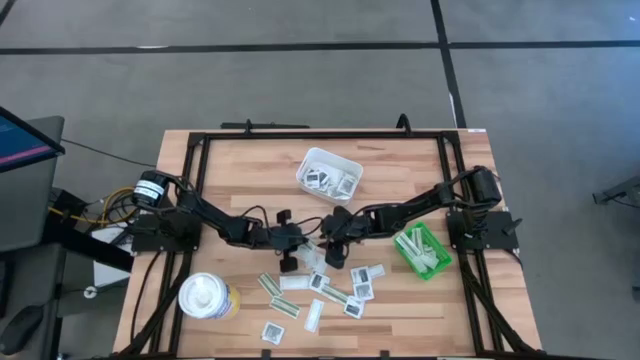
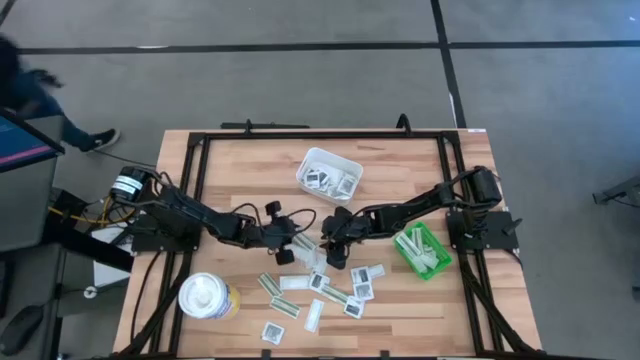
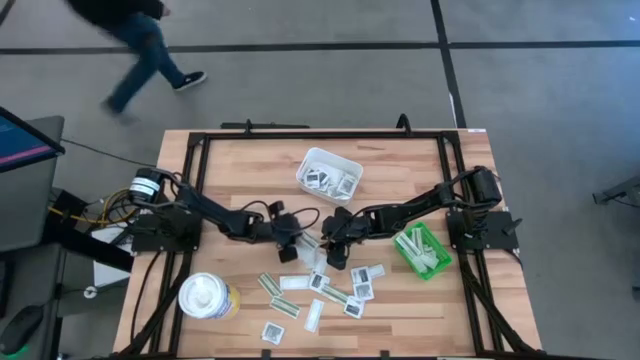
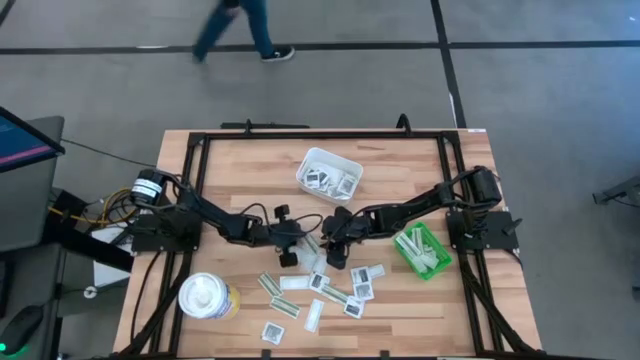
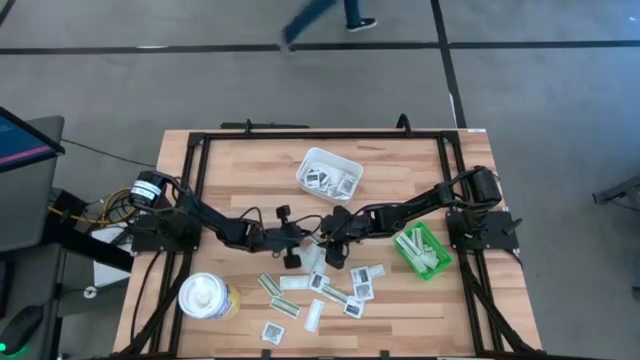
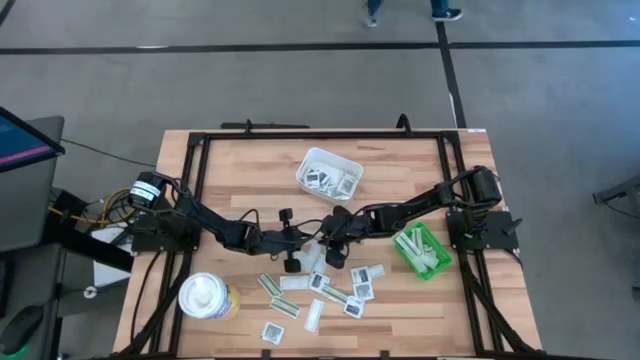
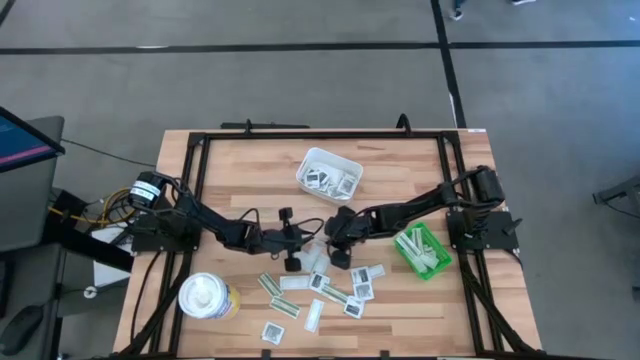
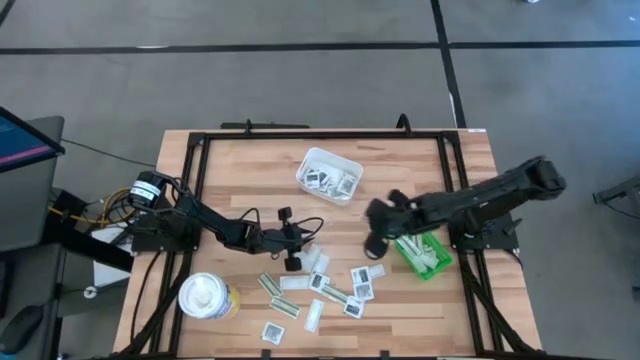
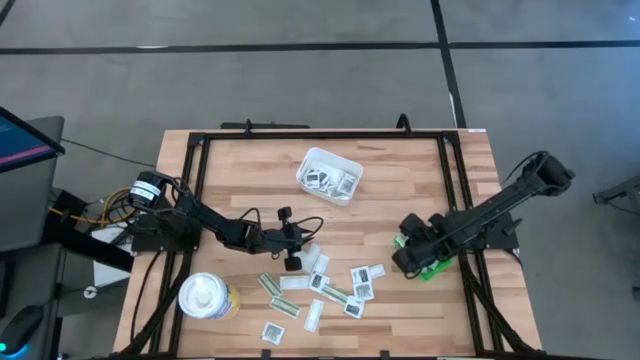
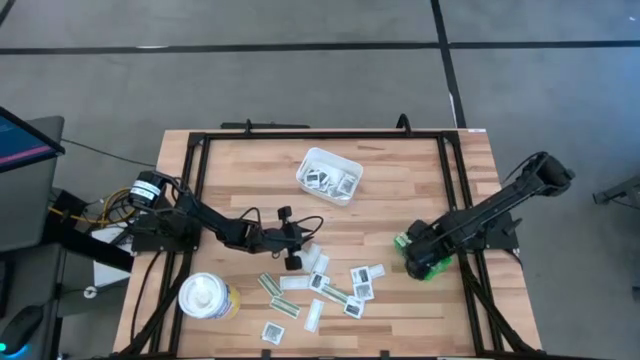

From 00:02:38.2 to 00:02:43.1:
Task: Pick & Place First Aid Supplies
Put the bandage pack into the green bin

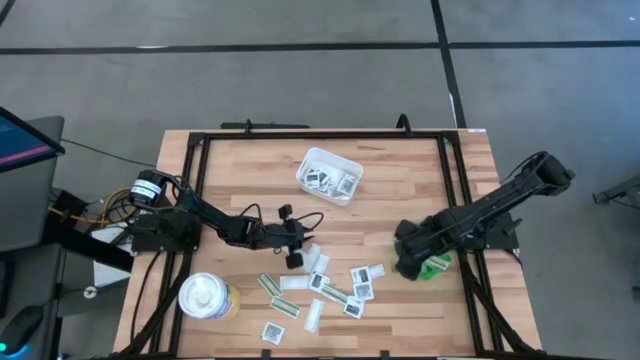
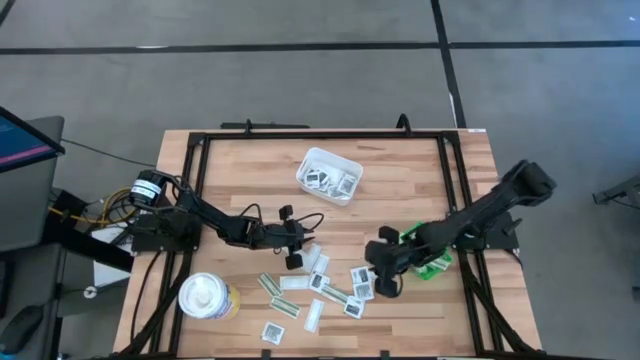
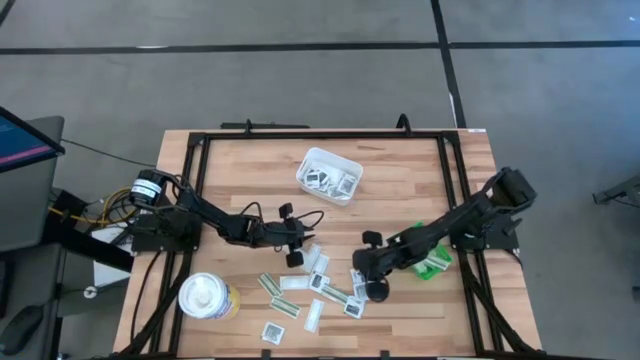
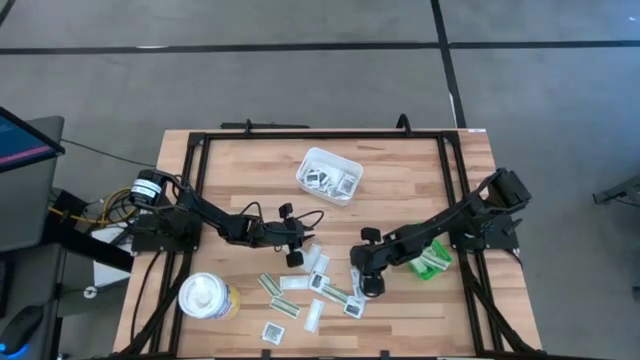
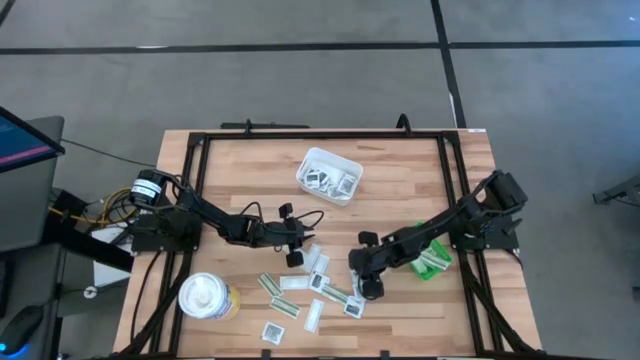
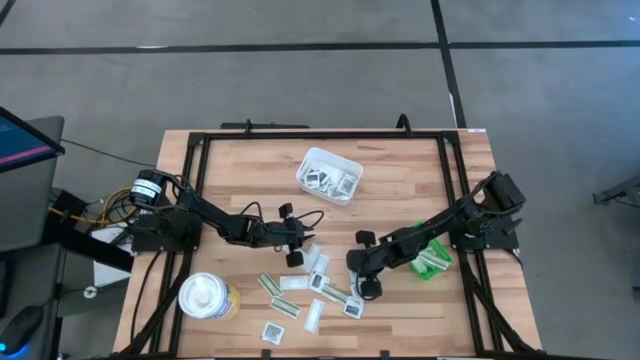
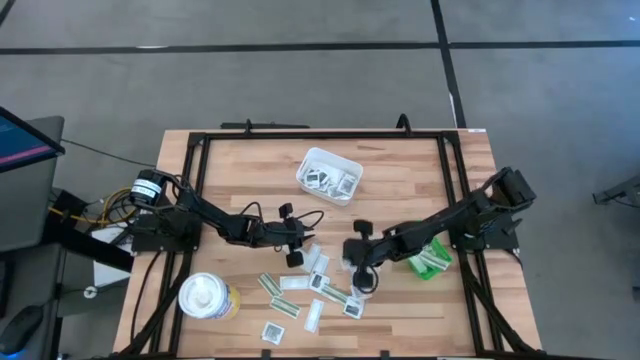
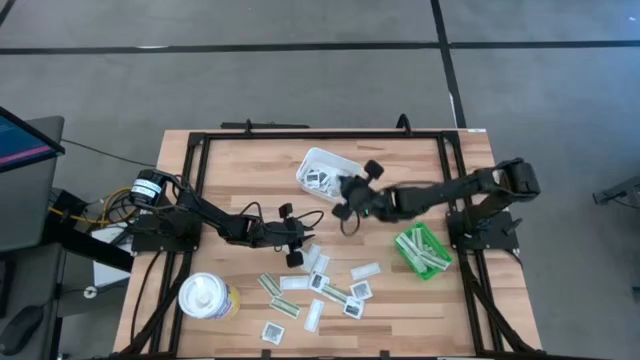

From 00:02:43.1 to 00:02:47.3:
Put the towelette pack into the white bin

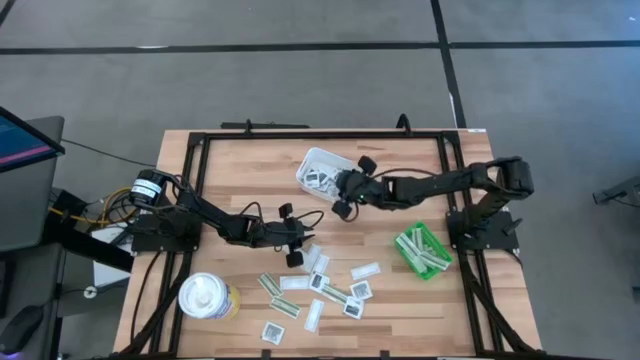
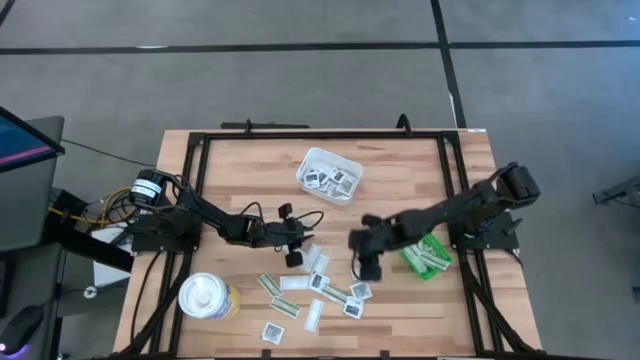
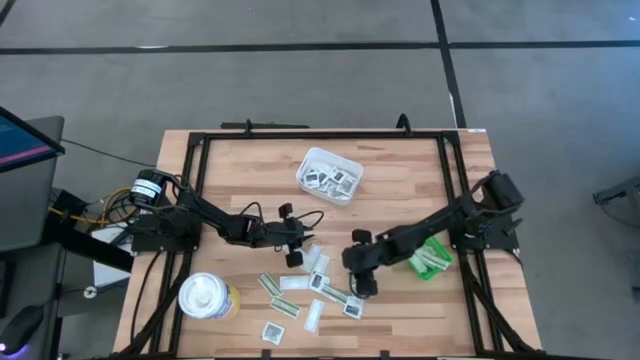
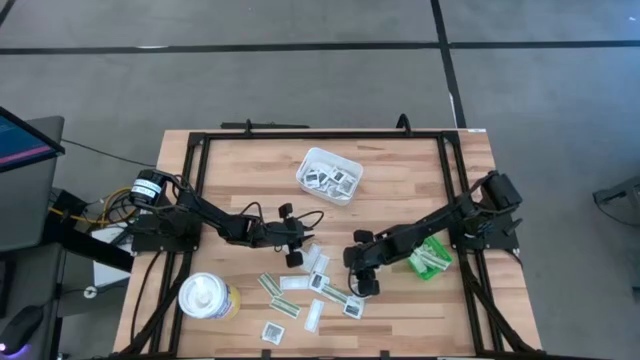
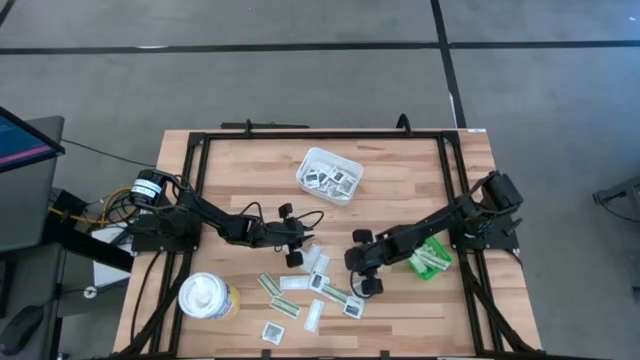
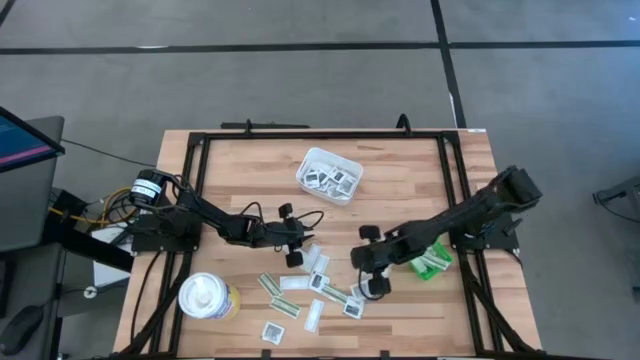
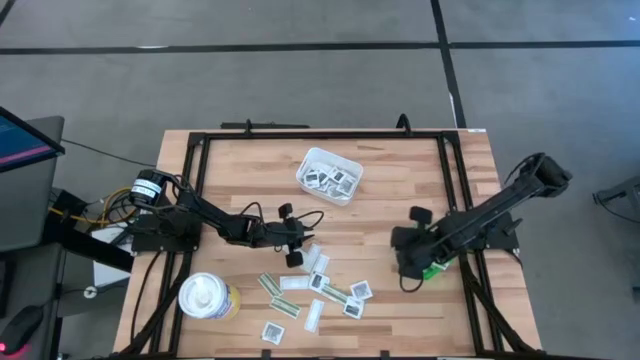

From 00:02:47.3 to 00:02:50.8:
Put the bandage pack into the green bin

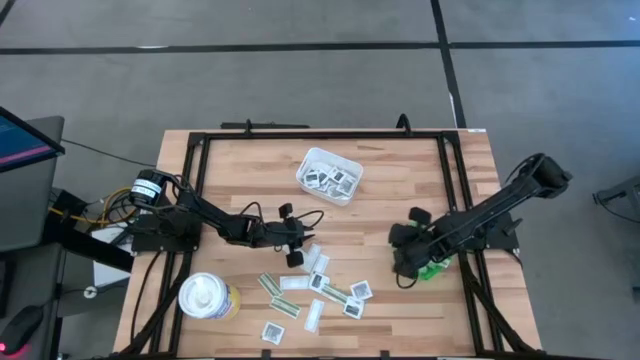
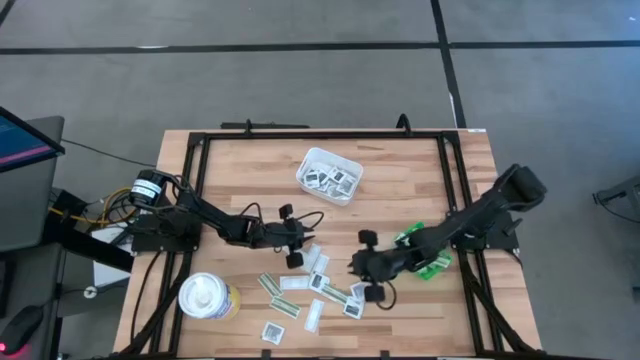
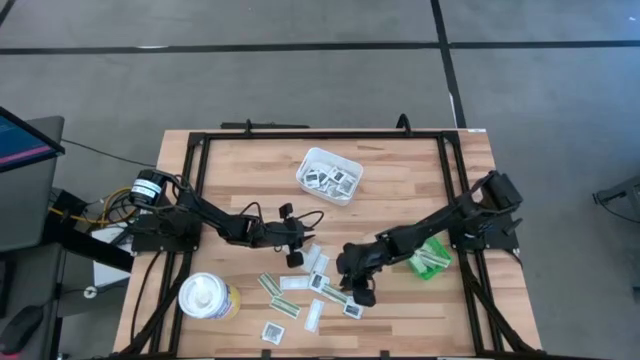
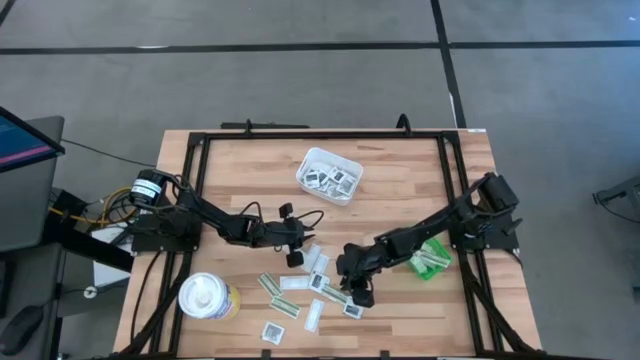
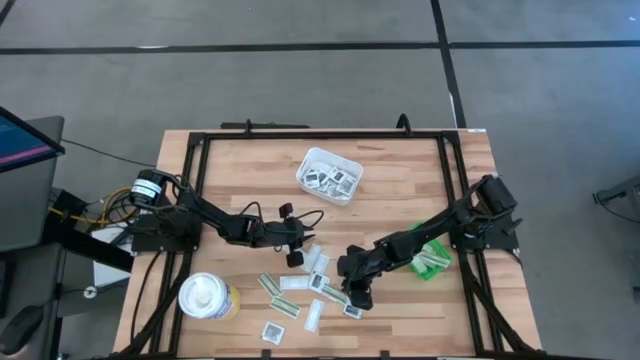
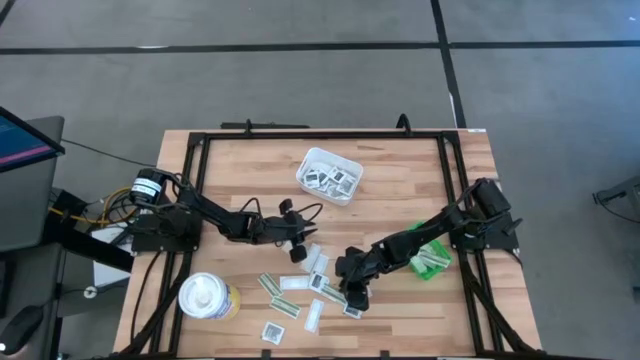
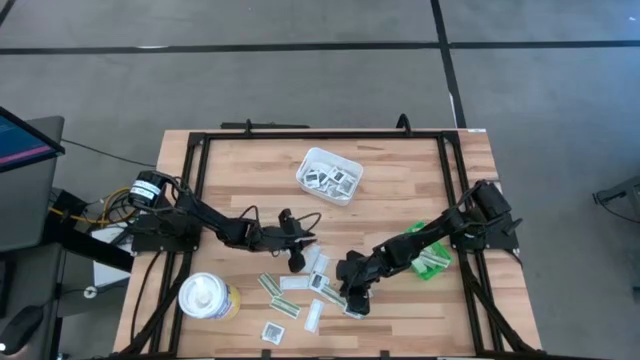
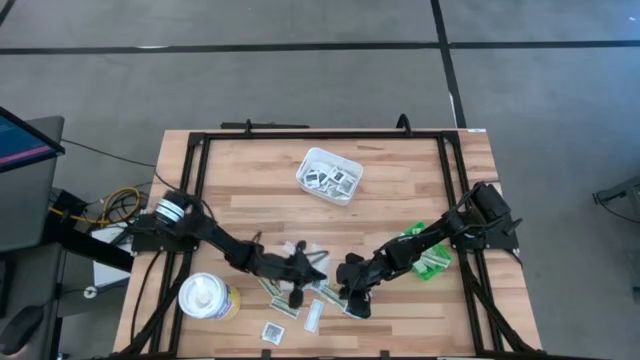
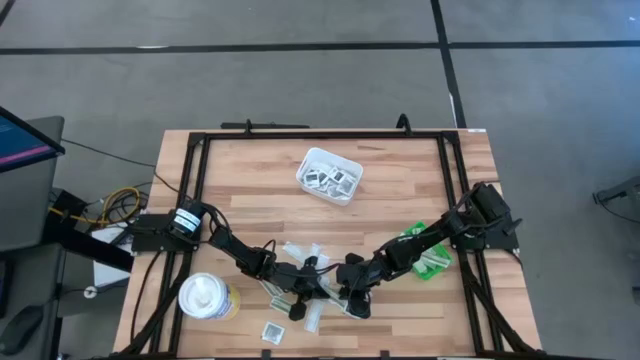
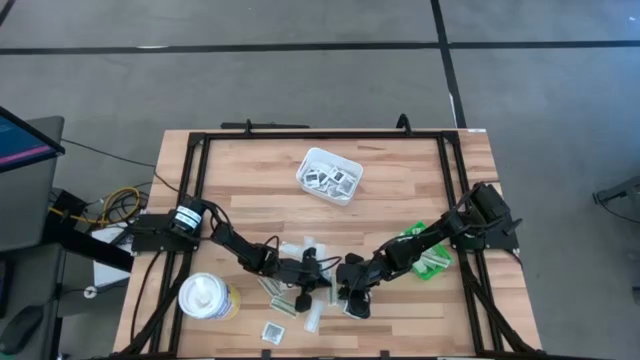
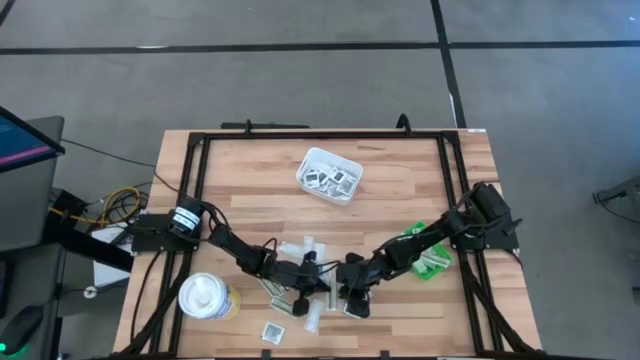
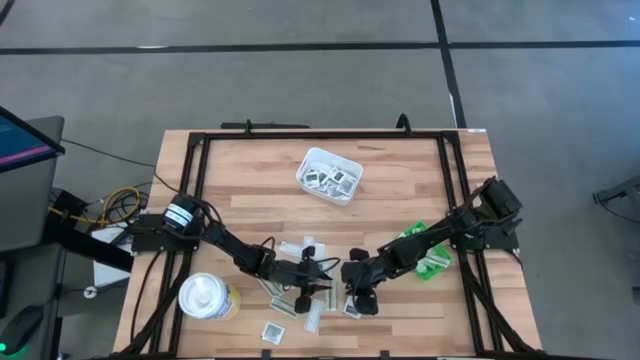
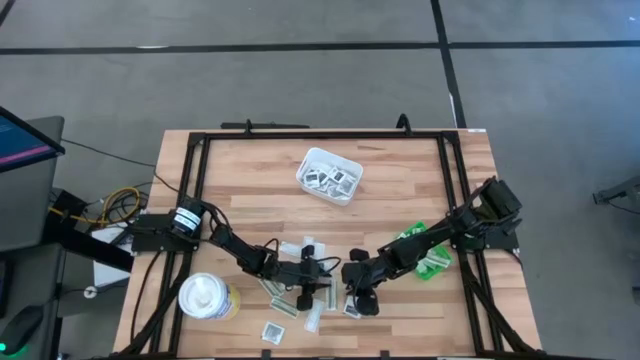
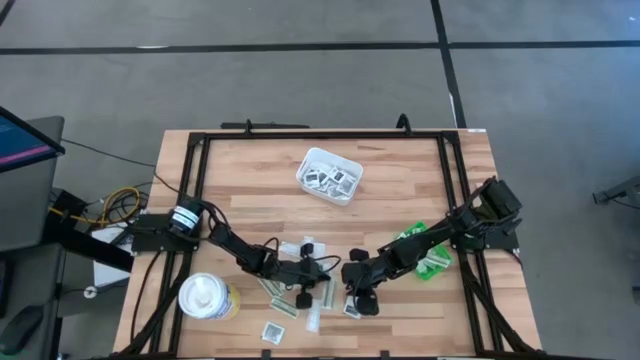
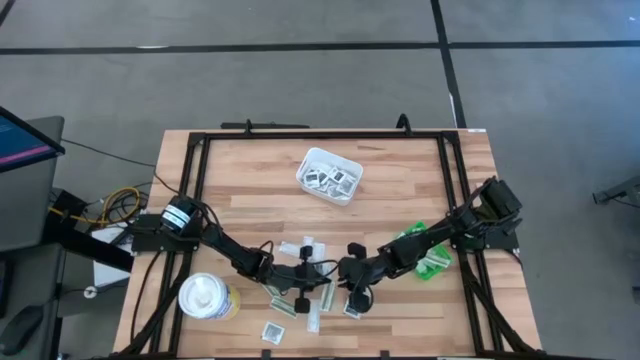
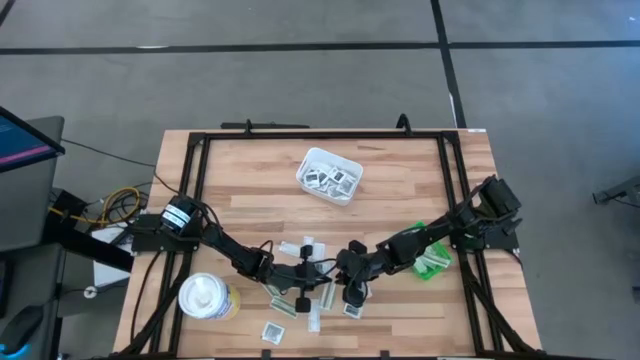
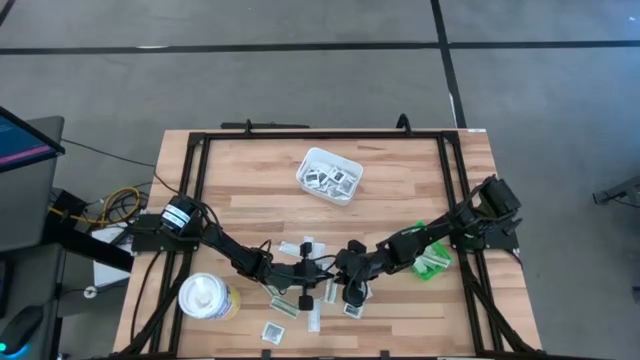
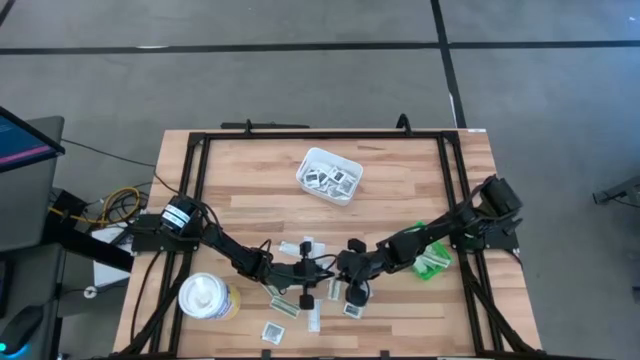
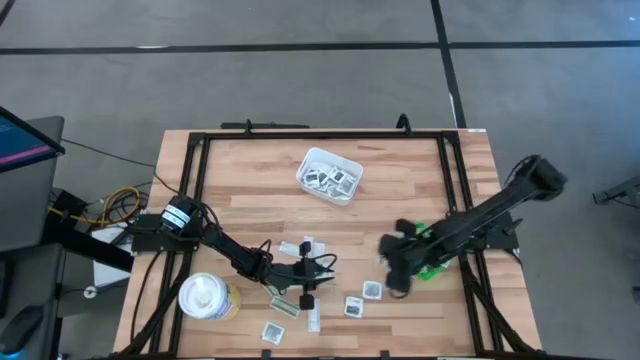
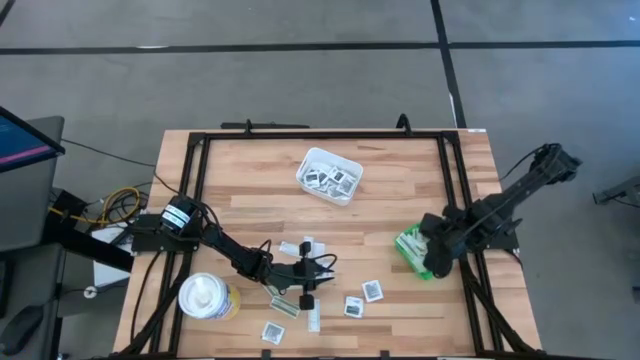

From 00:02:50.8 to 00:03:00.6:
Put the bandage pack into the green bin
